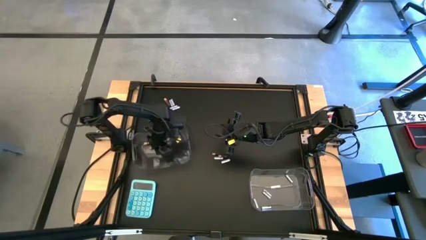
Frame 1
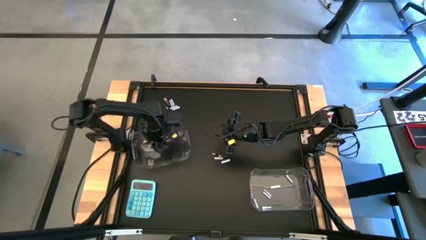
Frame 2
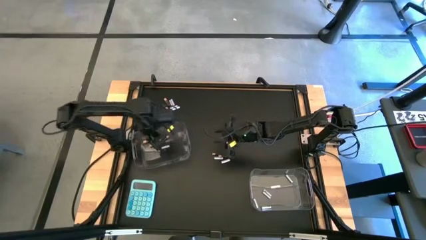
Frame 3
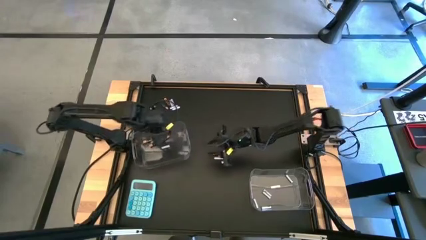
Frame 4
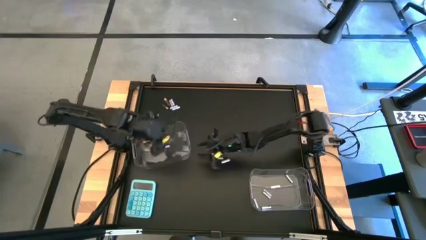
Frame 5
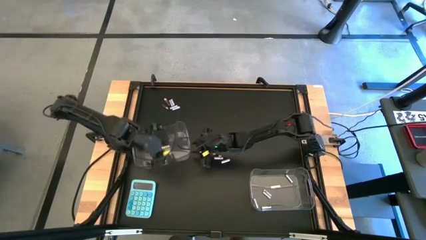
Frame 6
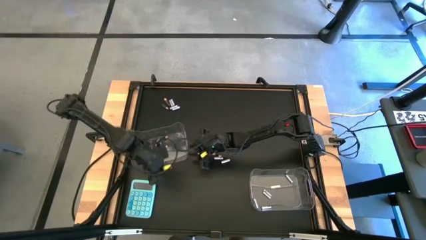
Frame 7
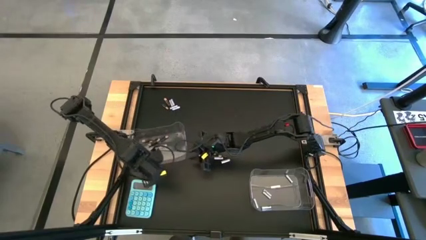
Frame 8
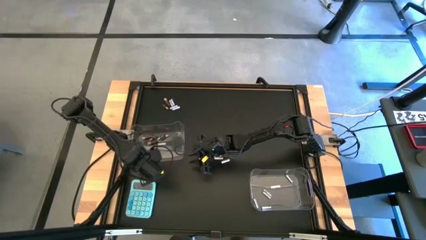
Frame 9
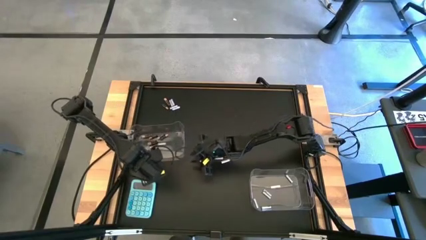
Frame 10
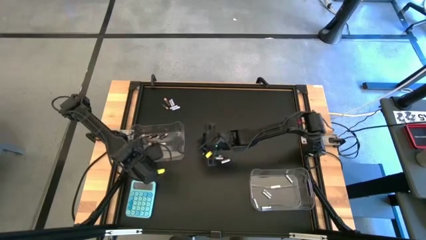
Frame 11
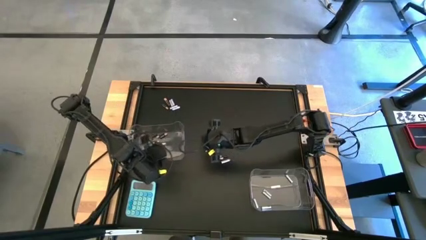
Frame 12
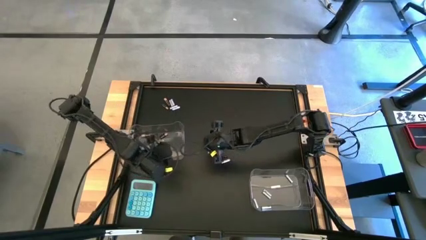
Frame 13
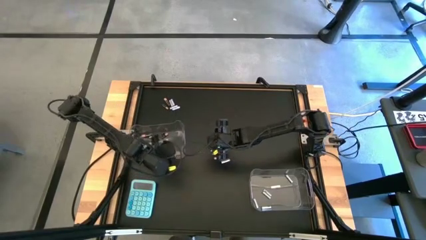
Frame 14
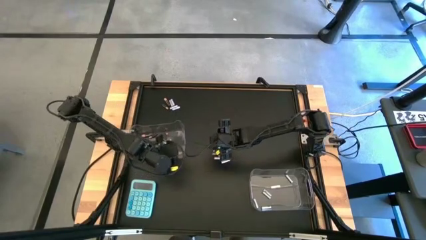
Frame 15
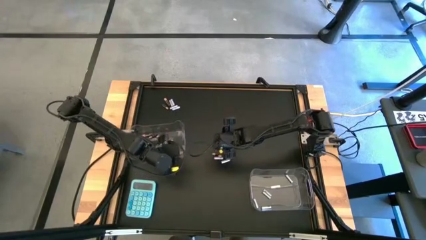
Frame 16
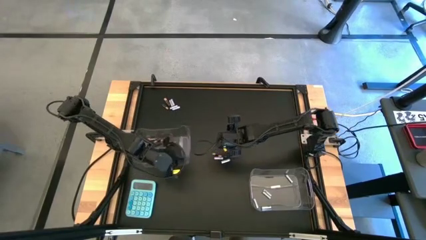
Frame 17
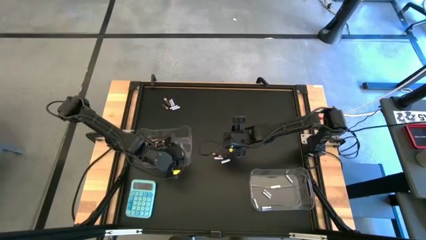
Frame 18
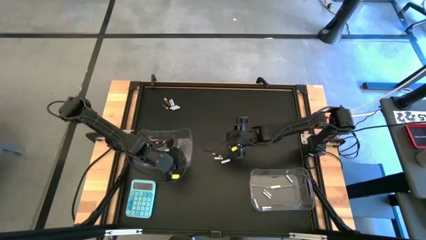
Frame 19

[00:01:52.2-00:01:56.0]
Task: Sort batteries
Adjust the left transparent bin

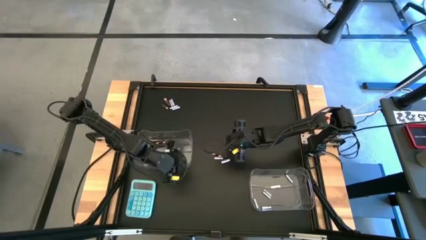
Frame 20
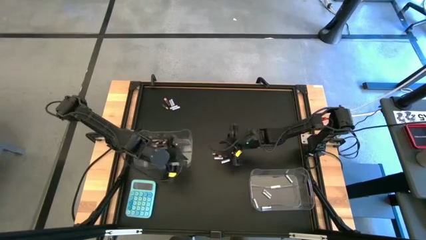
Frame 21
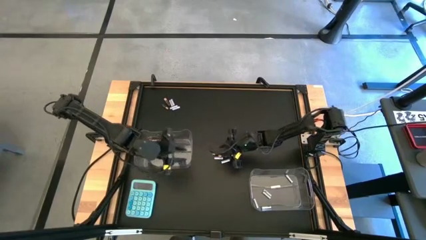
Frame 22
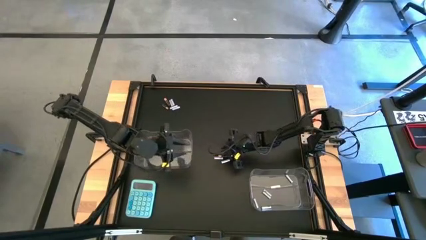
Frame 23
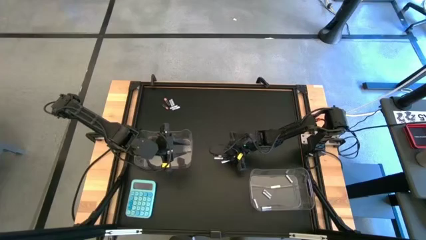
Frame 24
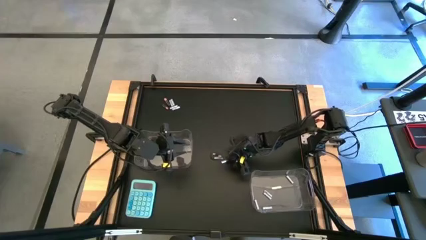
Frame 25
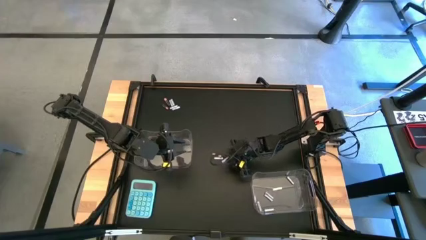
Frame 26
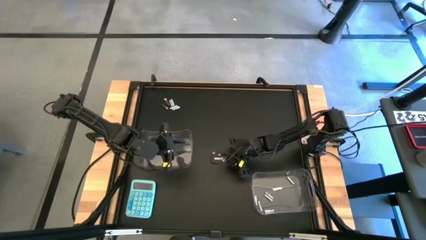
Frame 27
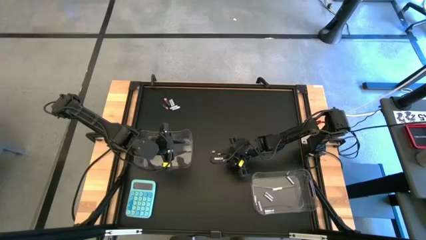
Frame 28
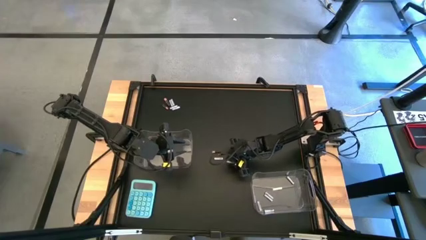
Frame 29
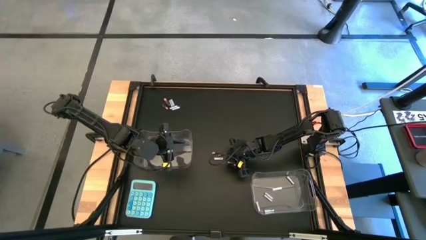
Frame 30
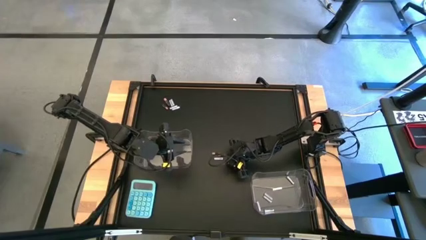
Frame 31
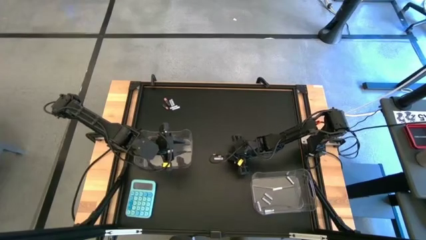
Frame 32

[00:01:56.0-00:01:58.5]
Put the white battery into the right transparent bin

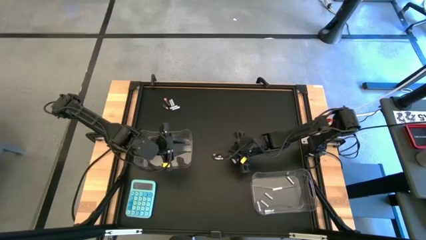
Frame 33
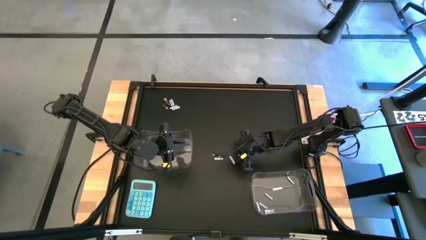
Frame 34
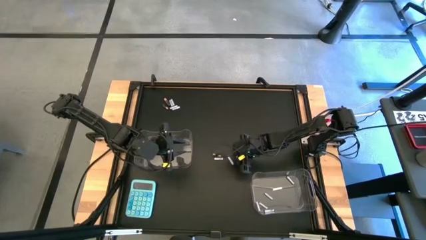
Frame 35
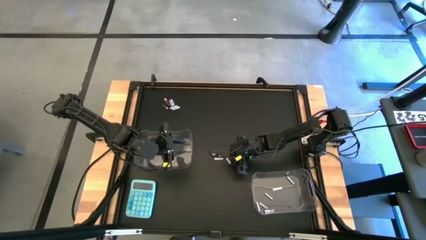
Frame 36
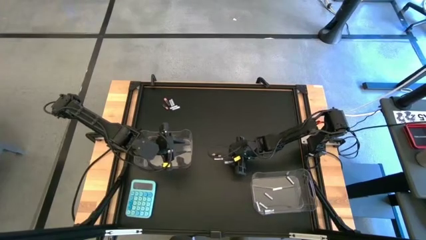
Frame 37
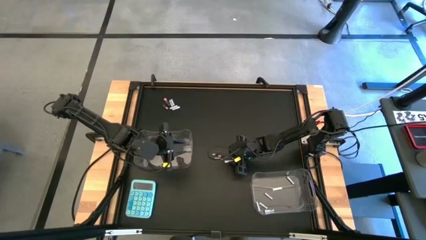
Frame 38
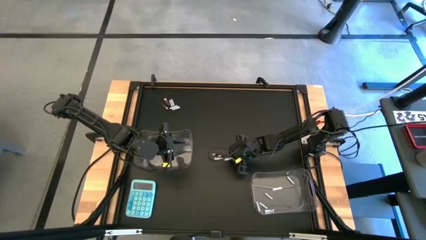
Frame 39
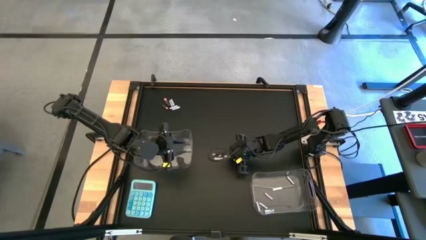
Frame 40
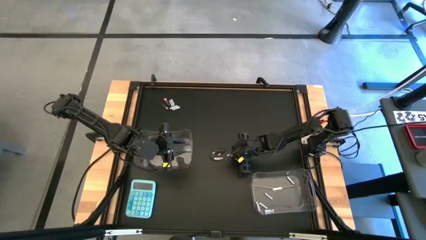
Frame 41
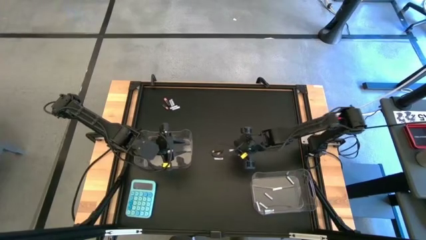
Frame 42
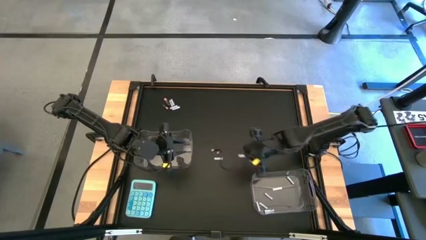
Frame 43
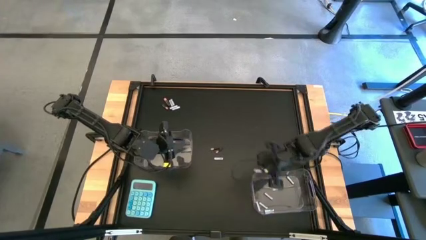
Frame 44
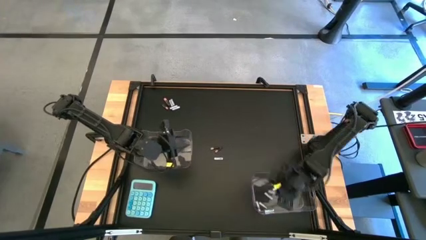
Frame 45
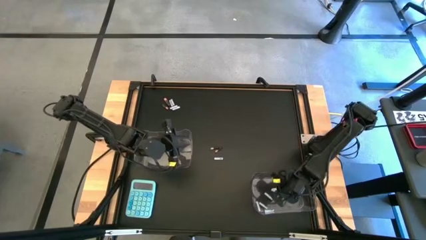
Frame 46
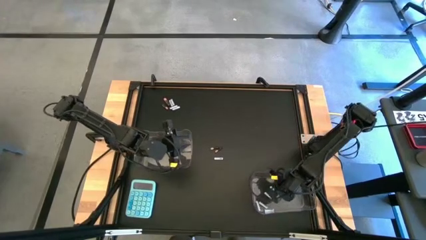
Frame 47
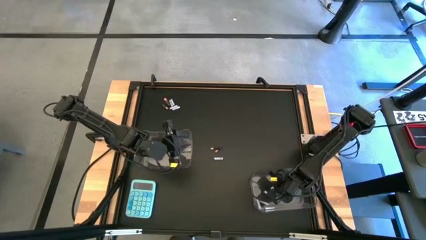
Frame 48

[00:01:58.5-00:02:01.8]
Put the white battery into the right transparent bin

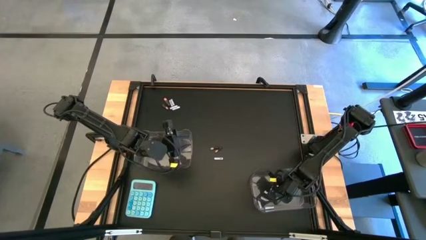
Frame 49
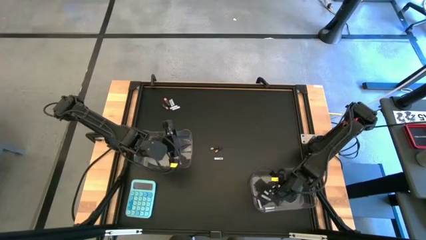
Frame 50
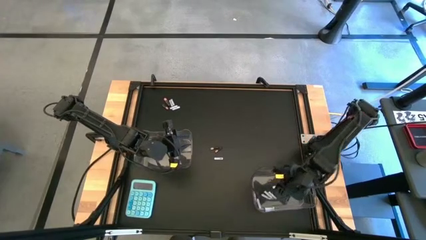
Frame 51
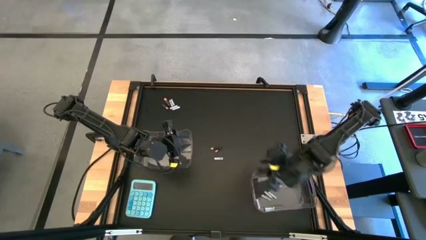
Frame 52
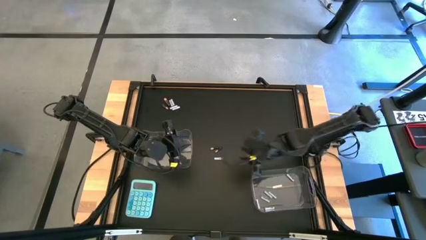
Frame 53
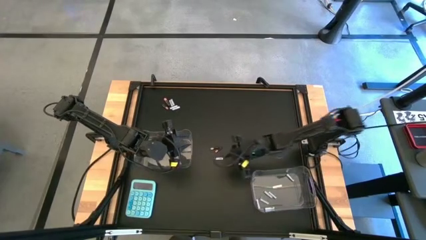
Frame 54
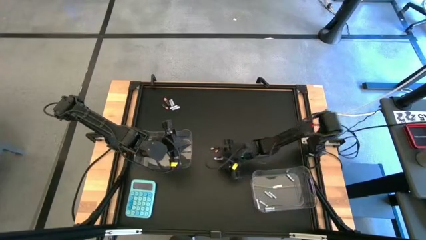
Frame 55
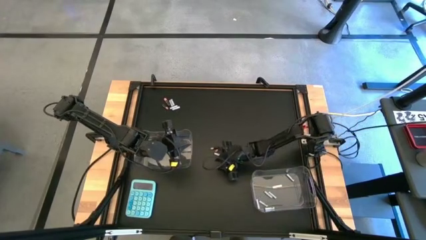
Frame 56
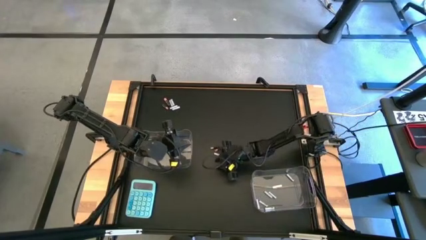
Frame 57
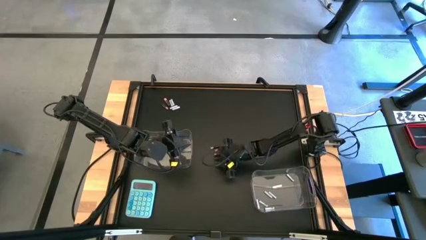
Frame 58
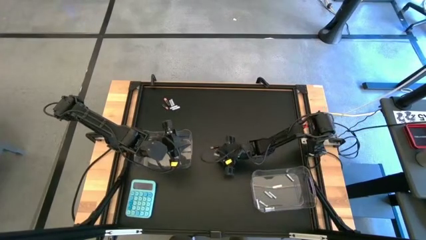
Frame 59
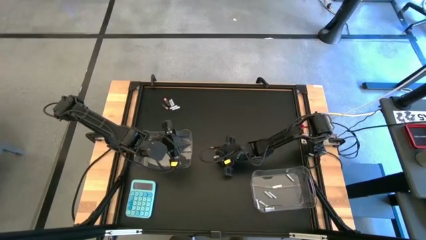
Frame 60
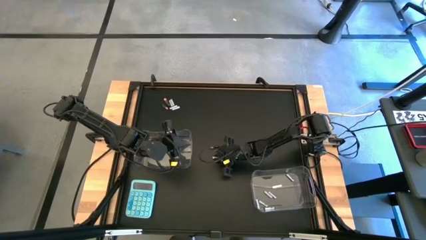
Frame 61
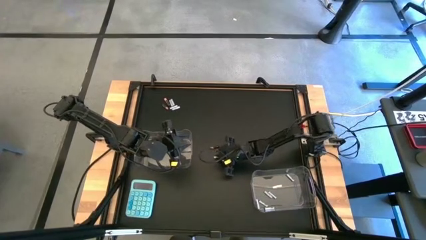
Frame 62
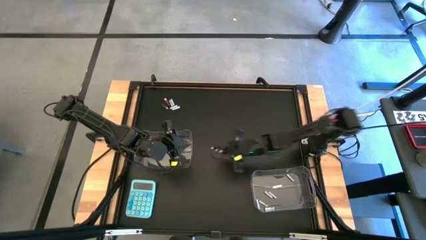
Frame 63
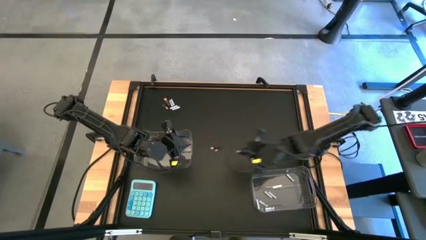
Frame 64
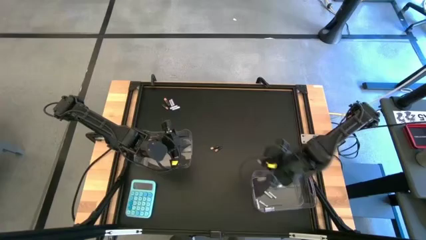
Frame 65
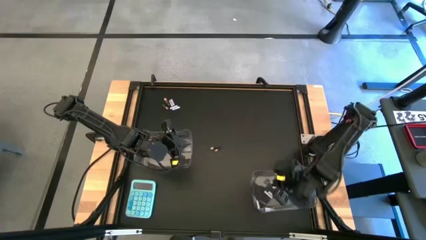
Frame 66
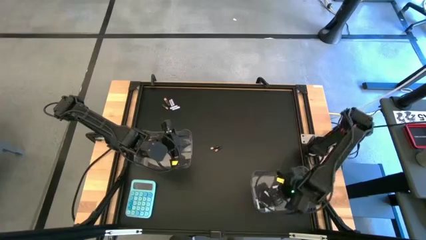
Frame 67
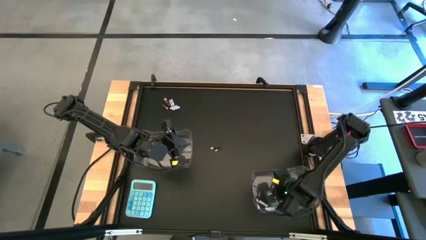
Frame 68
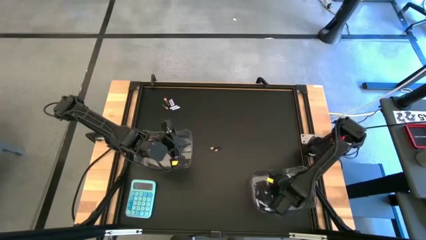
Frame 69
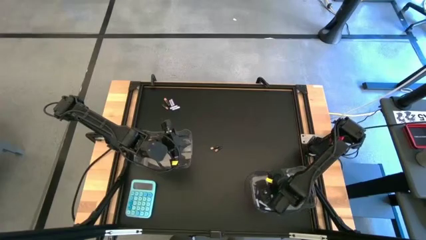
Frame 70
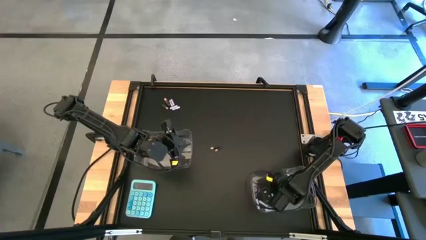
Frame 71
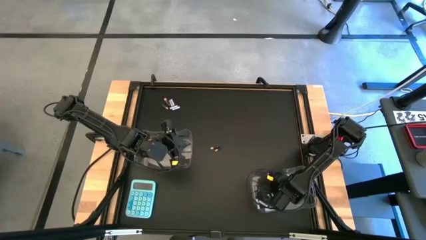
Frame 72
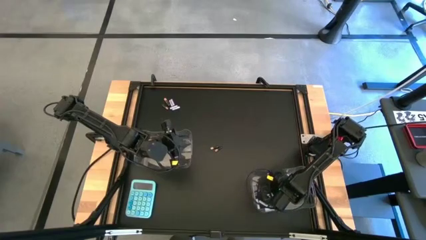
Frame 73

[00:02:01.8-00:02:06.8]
Put the white battery into the right transparent bin
